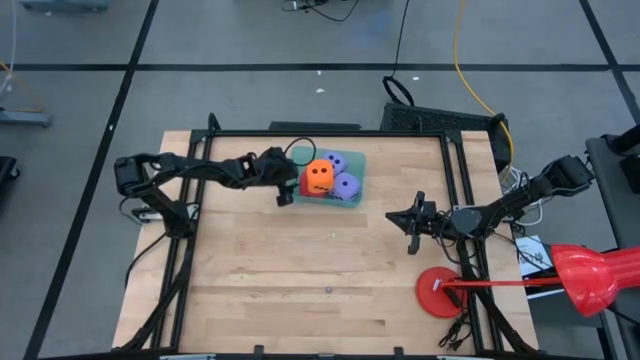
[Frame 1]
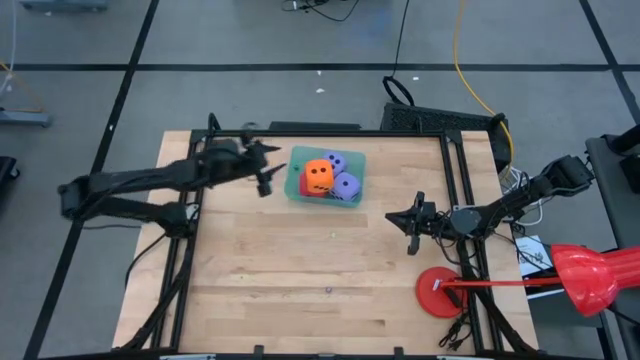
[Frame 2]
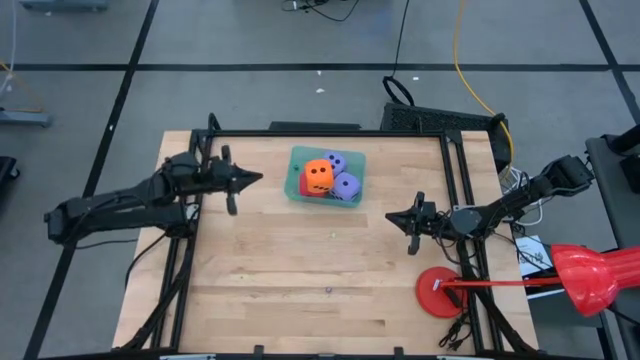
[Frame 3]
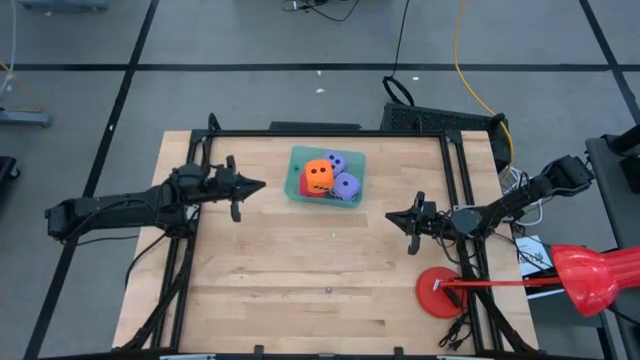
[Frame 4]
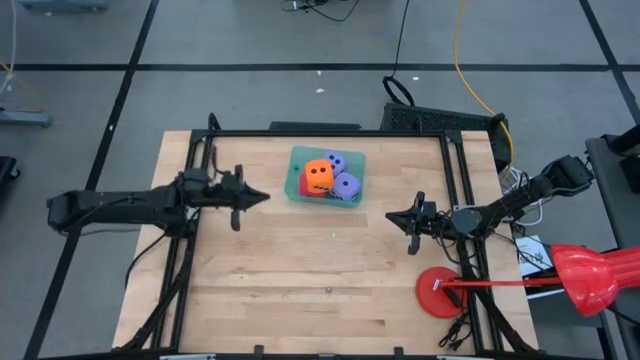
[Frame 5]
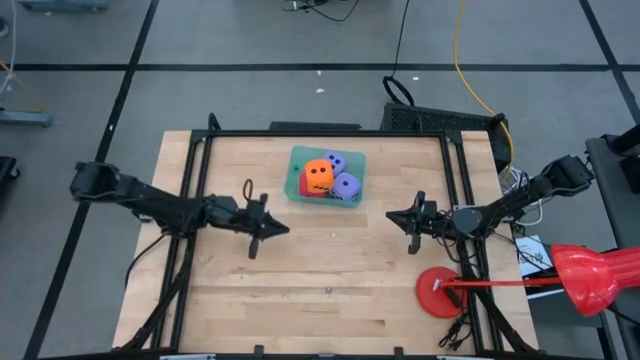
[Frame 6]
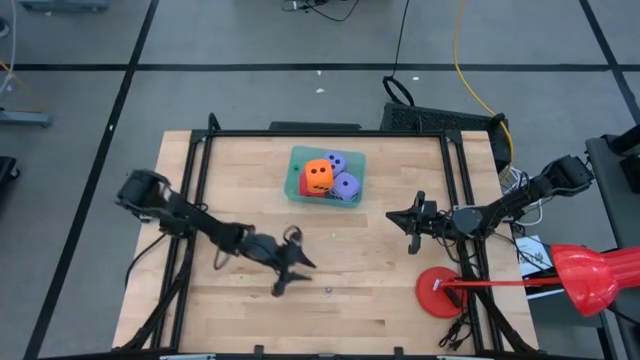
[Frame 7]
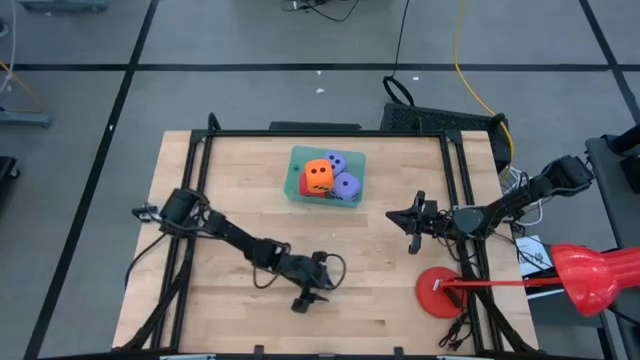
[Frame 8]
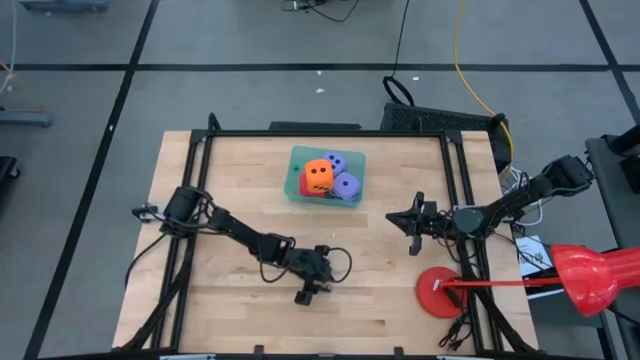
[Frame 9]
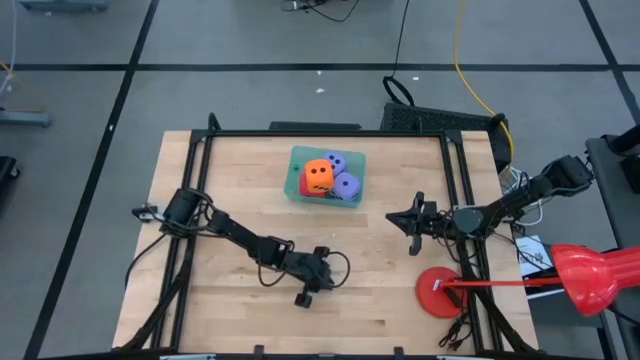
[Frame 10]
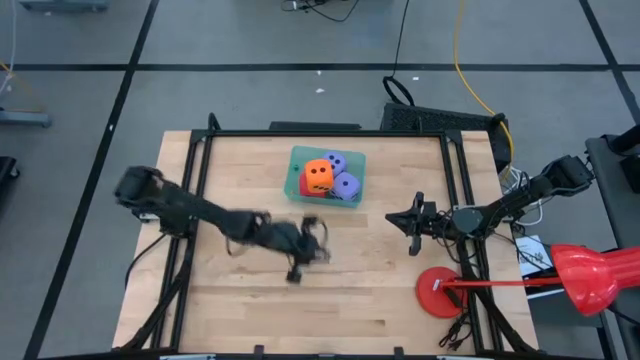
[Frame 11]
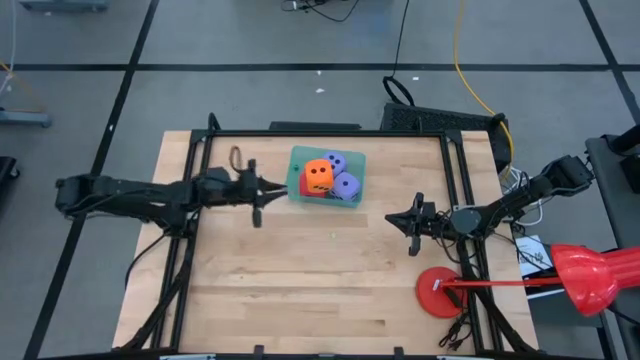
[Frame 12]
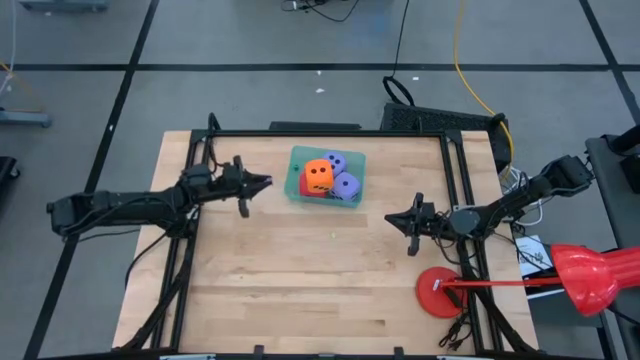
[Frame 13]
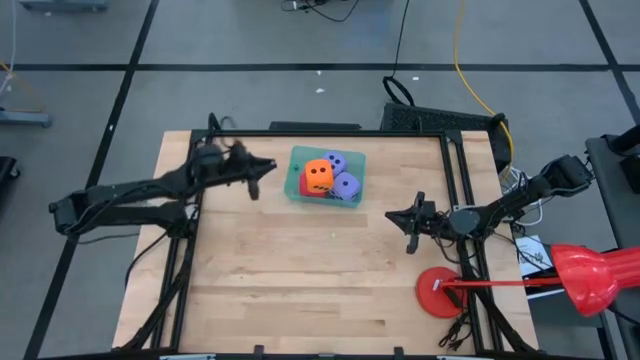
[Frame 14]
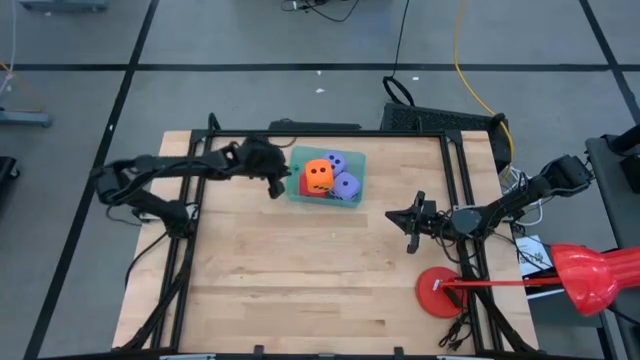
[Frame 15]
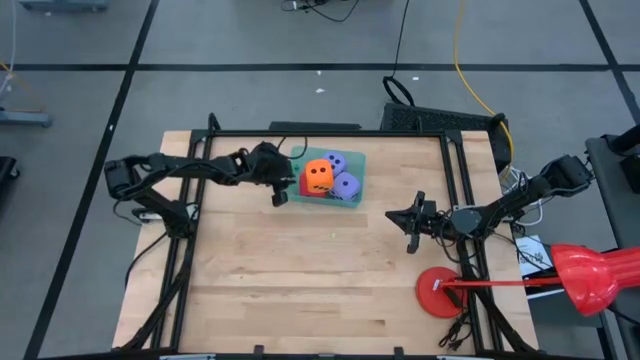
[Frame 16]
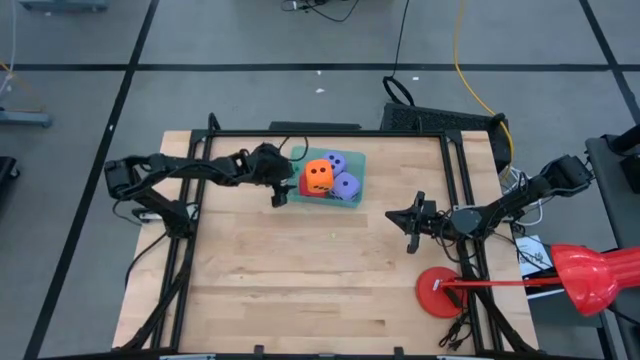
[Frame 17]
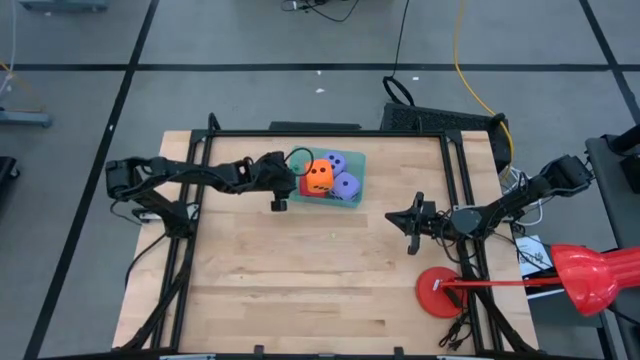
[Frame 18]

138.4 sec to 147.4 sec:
Task: Pick & Place Dice
Put the small purple dice into the blue bin

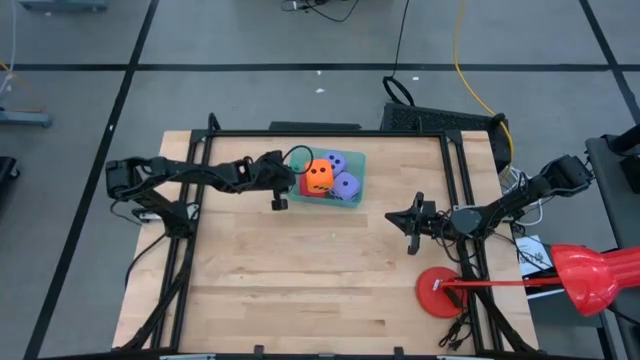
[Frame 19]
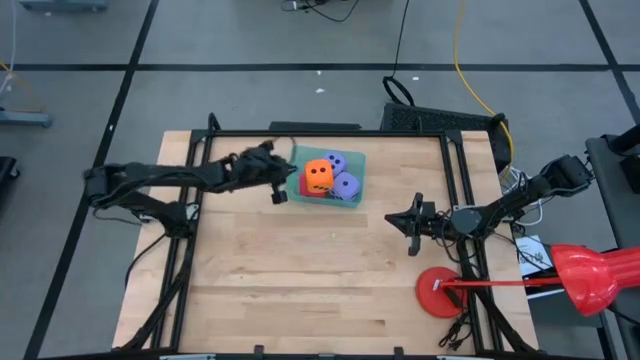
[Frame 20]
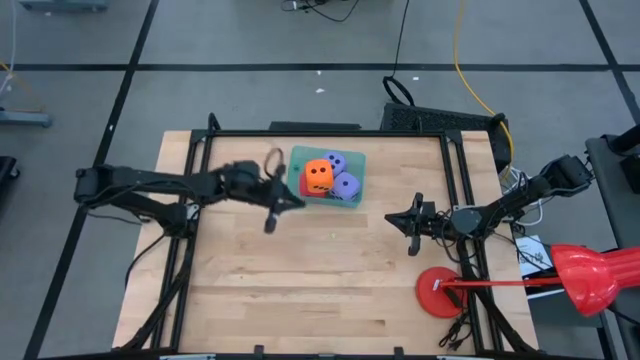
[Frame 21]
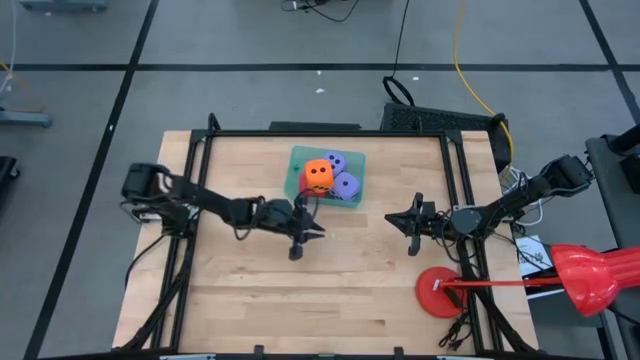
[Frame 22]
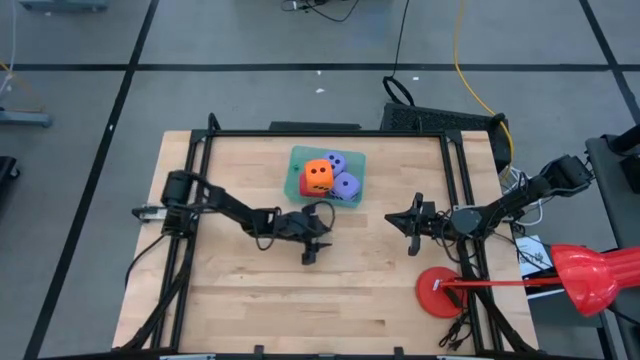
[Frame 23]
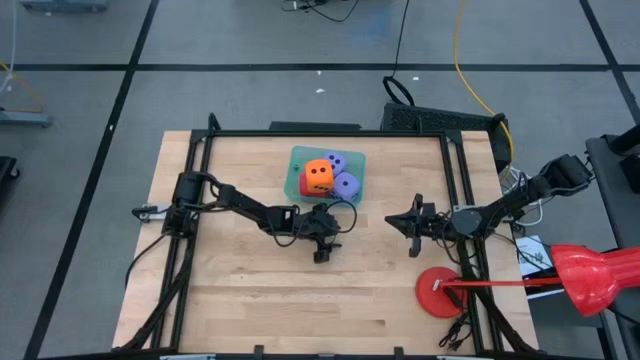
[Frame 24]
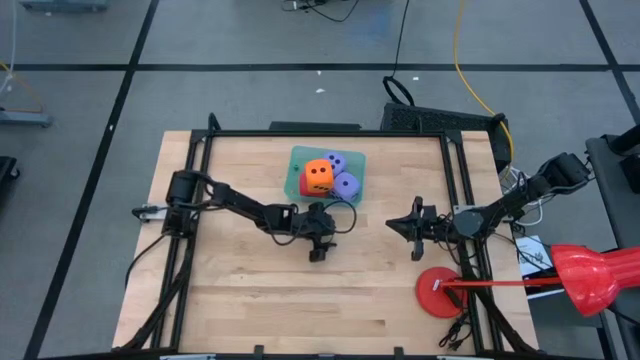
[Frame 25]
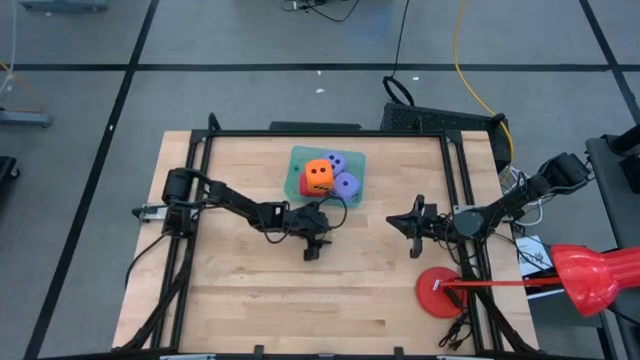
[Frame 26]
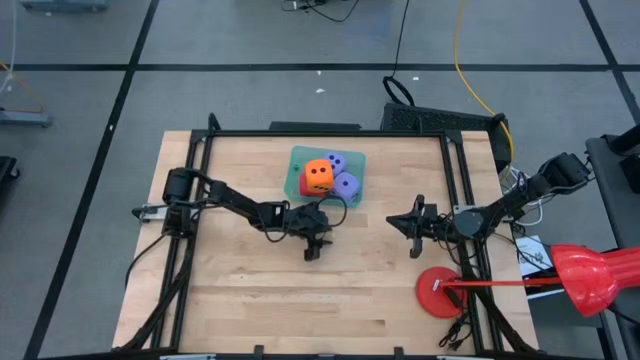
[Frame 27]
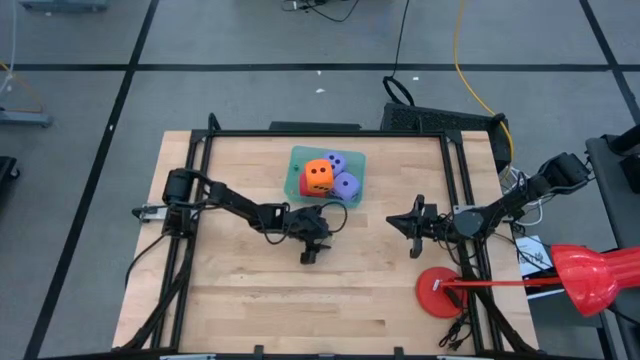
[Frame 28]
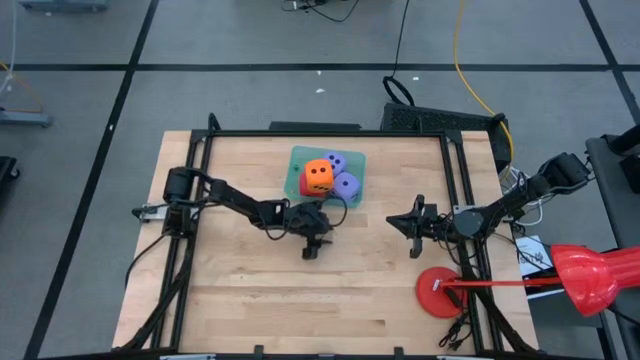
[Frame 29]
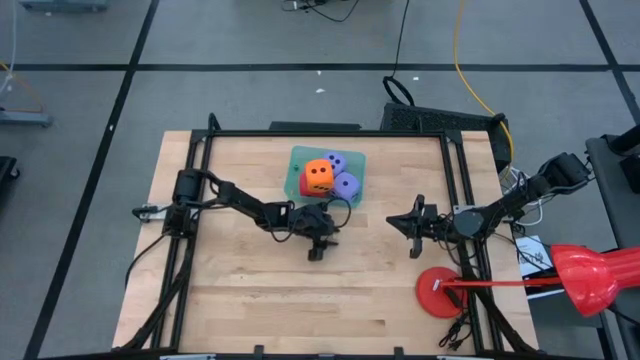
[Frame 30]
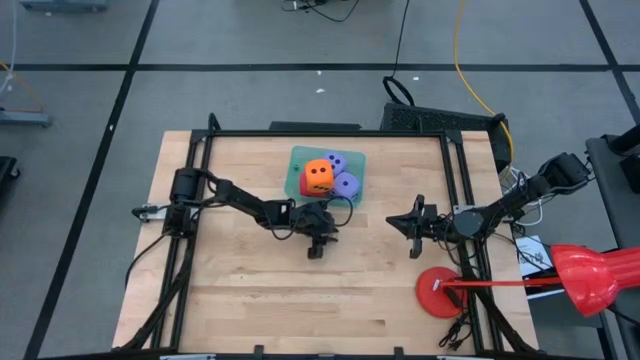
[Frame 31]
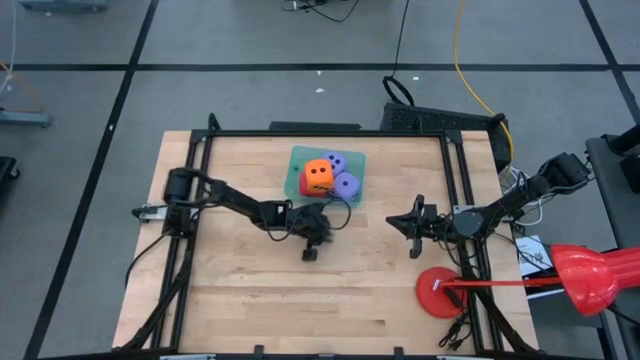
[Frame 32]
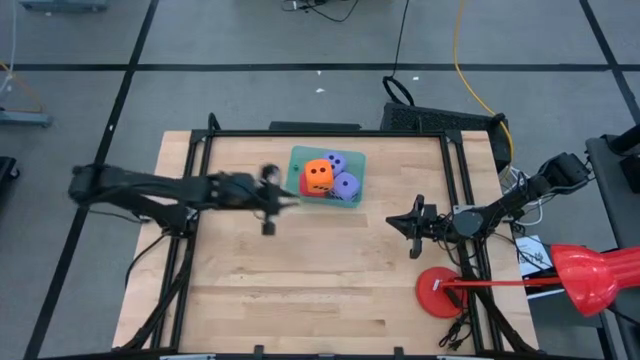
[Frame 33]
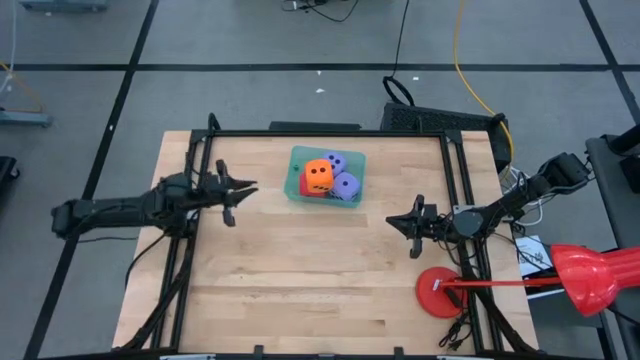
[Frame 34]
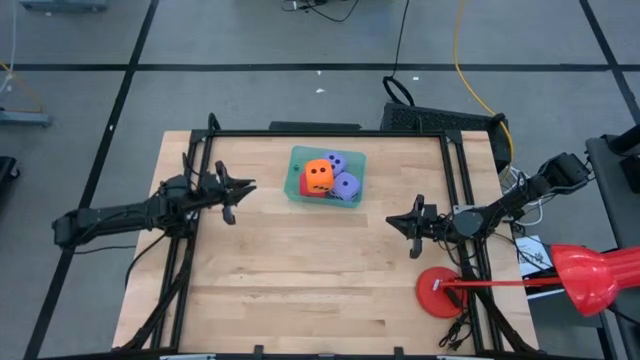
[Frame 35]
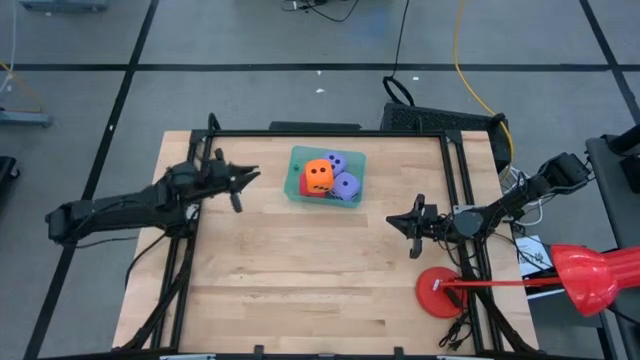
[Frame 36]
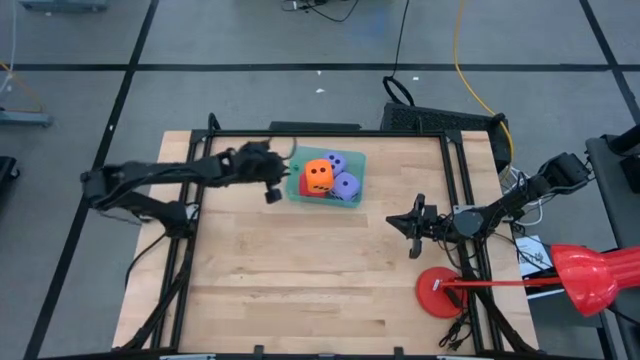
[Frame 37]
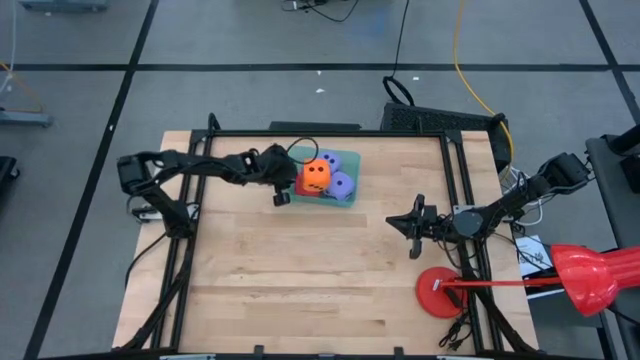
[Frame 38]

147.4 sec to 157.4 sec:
Put the small light green dice into the blue bin

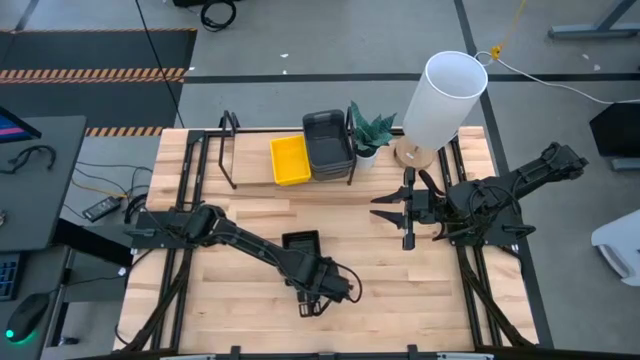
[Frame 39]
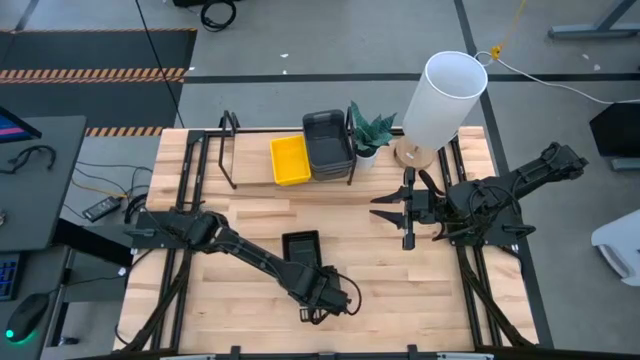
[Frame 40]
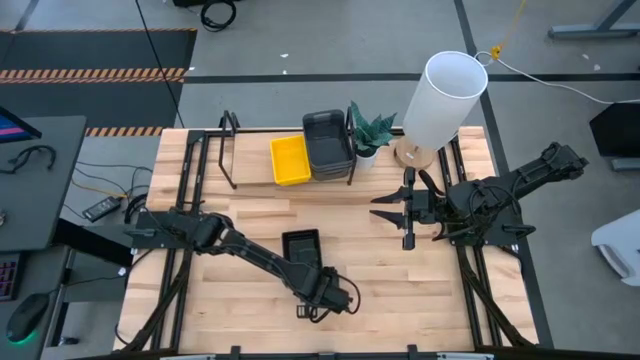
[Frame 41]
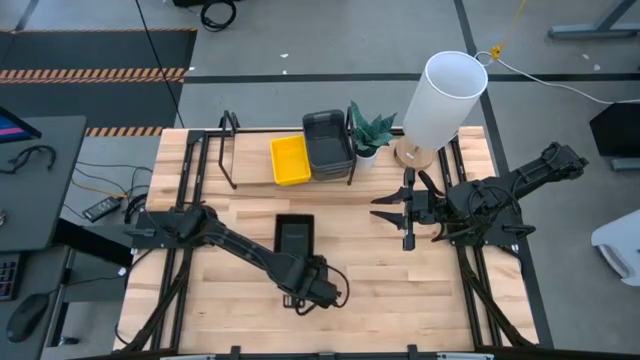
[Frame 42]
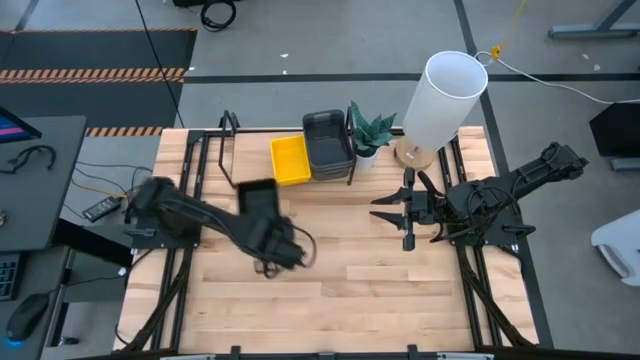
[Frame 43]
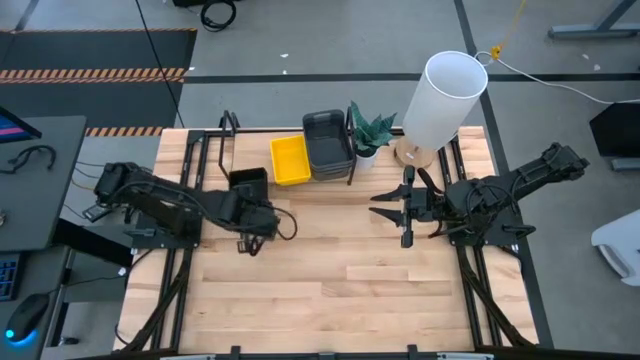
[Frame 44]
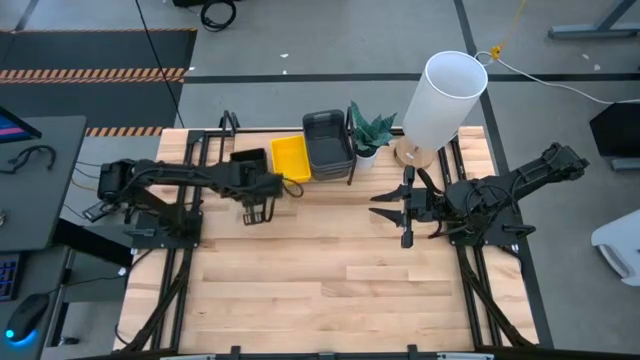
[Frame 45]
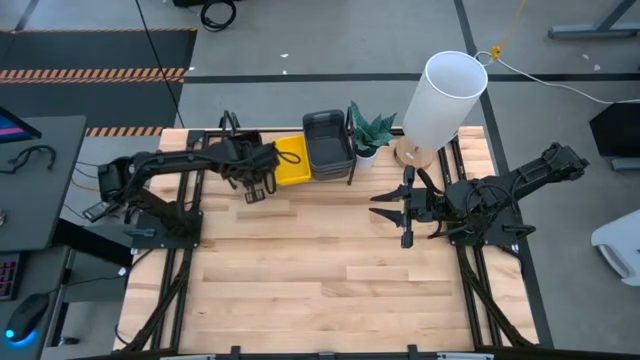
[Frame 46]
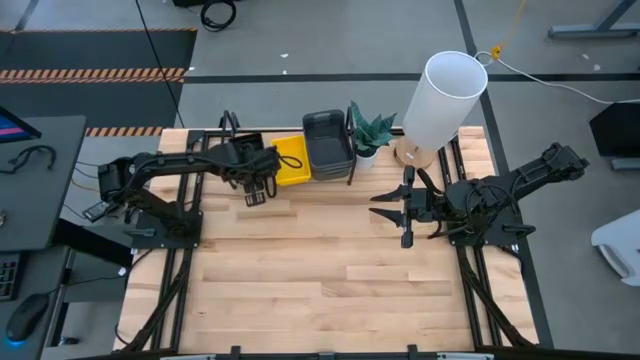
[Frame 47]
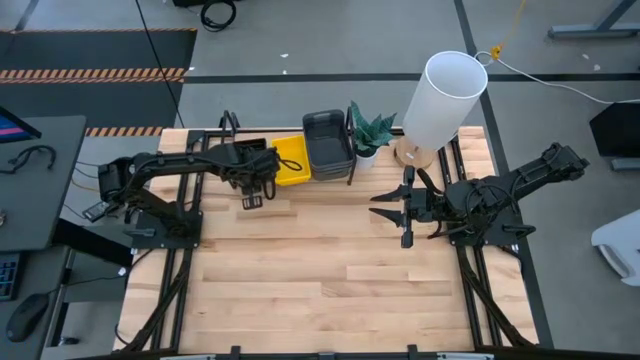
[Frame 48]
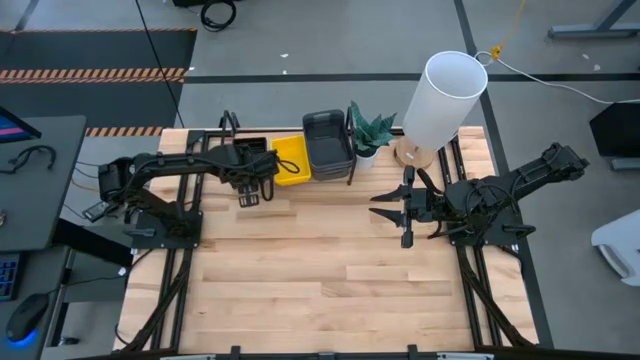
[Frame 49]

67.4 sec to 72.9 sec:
Task: Stack baskets on shelf by color
Put the stacked black bins on the shelf
